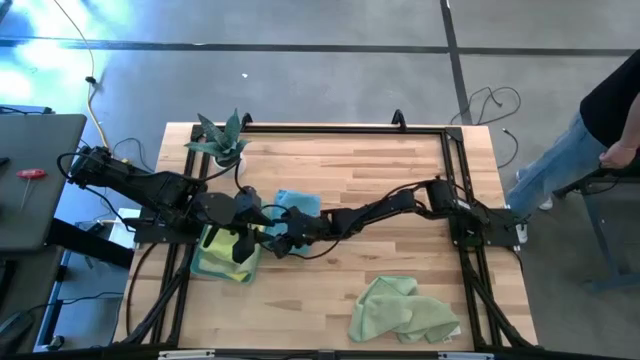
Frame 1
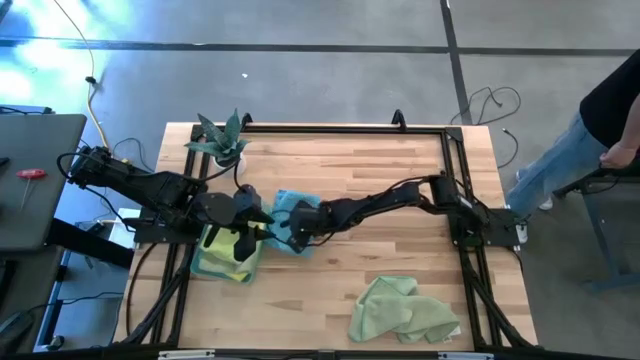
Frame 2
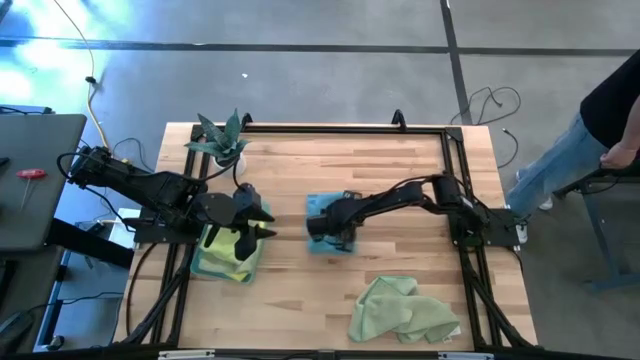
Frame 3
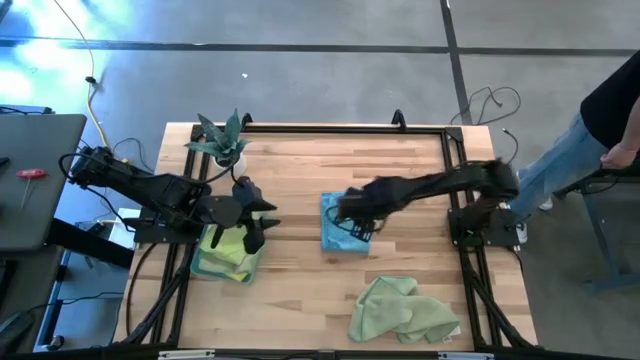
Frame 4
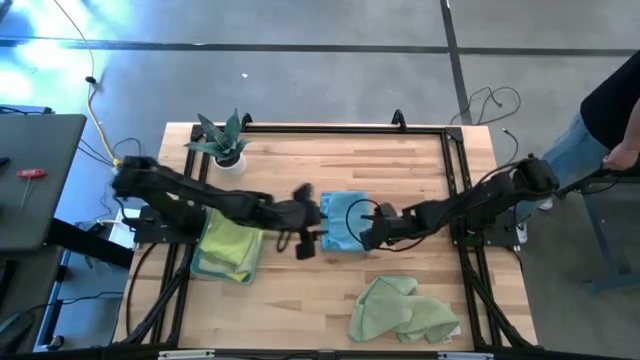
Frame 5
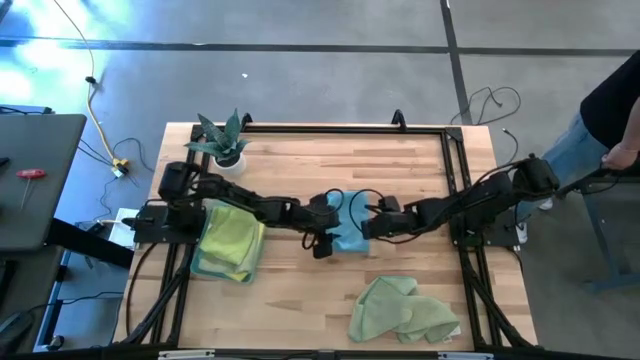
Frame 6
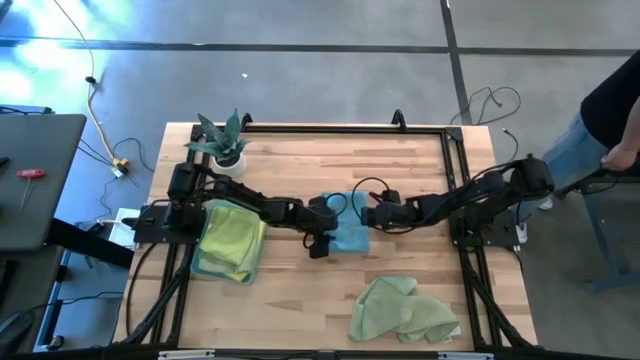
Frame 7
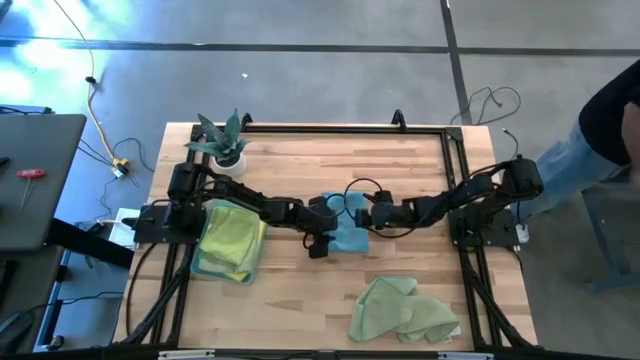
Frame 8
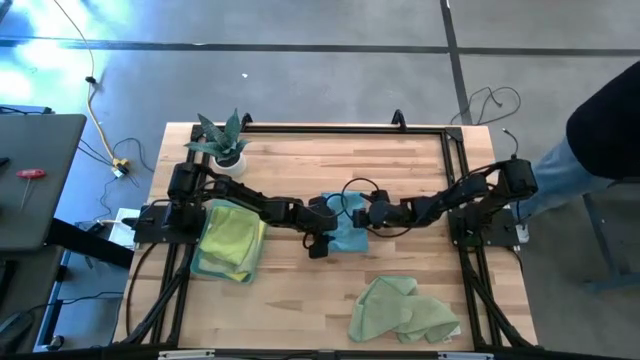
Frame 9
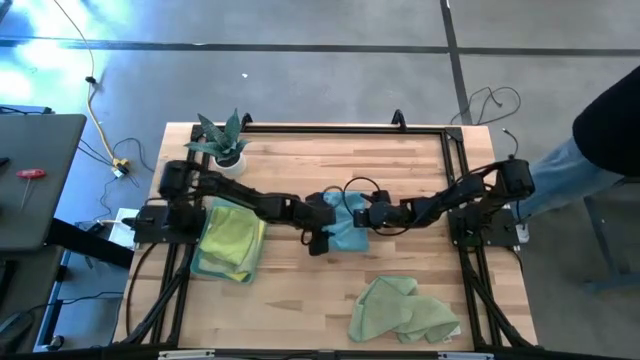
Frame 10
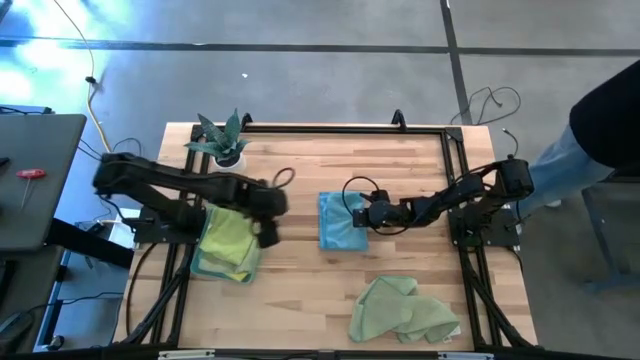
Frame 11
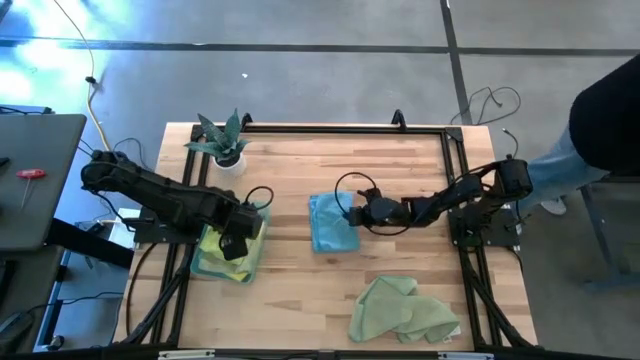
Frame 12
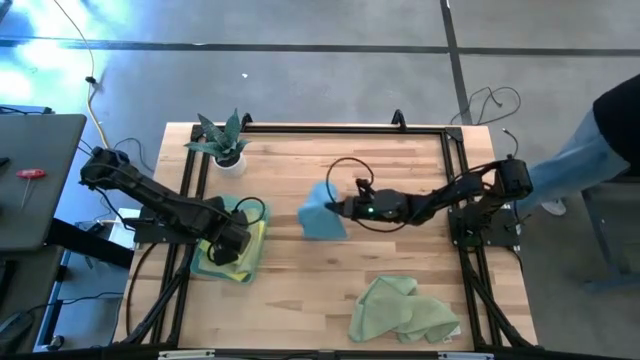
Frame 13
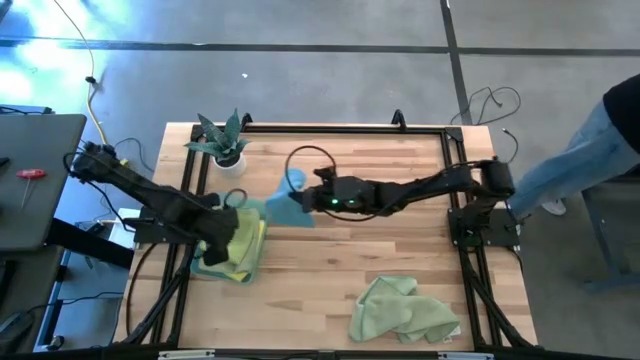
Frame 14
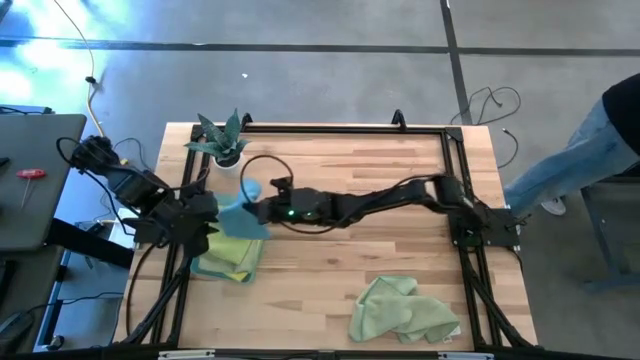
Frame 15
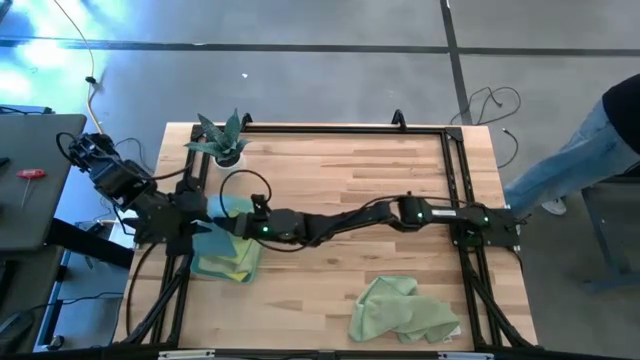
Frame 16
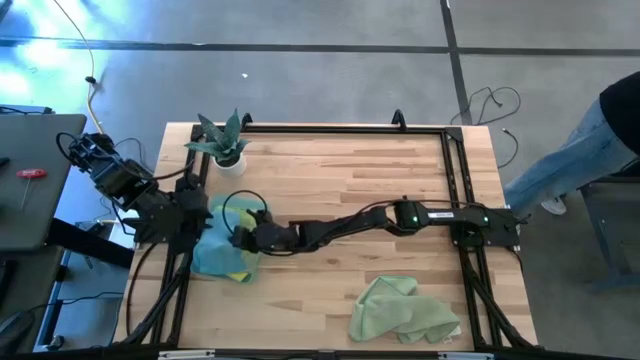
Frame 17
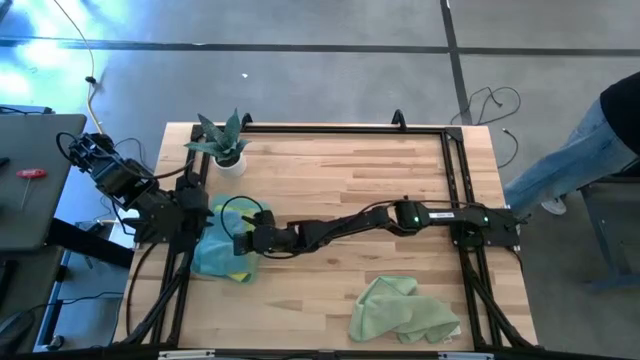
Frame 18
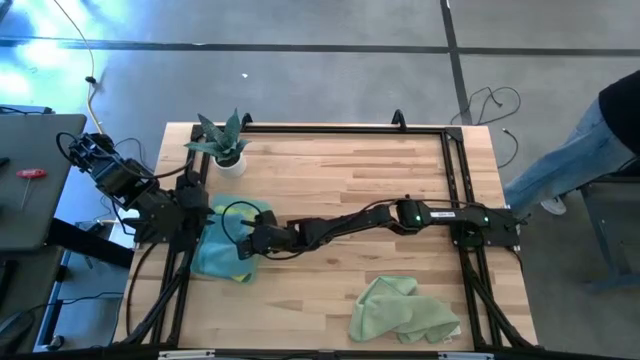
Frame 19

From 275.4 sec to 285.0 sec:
Task: Fold microfiber towels
Put the blue microfiber towel into the green bin

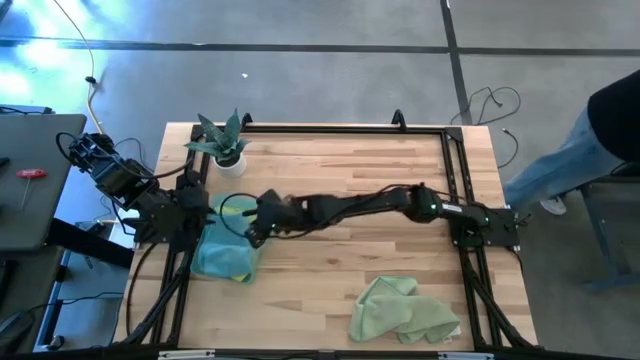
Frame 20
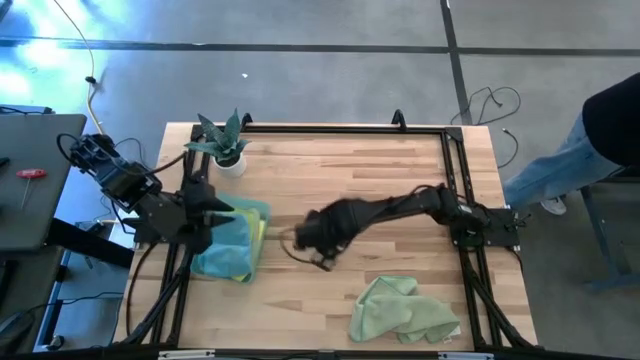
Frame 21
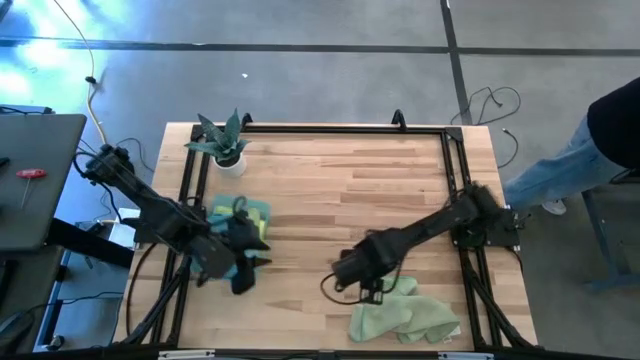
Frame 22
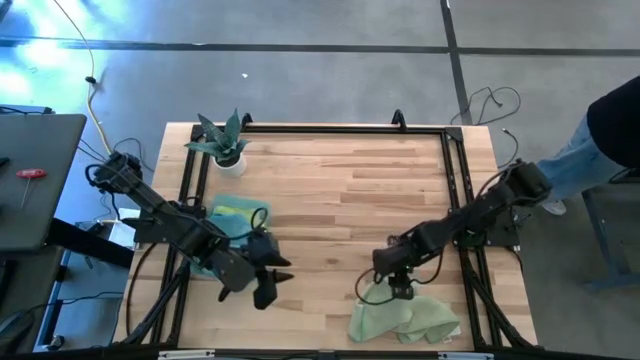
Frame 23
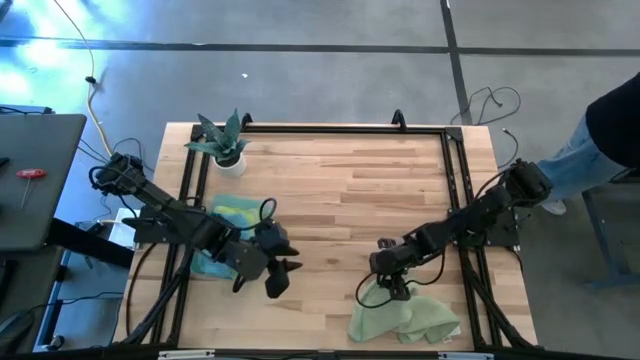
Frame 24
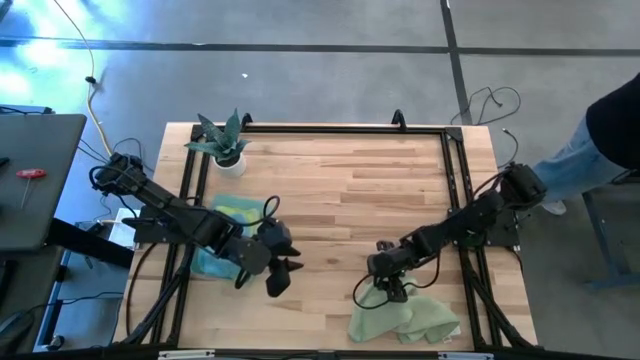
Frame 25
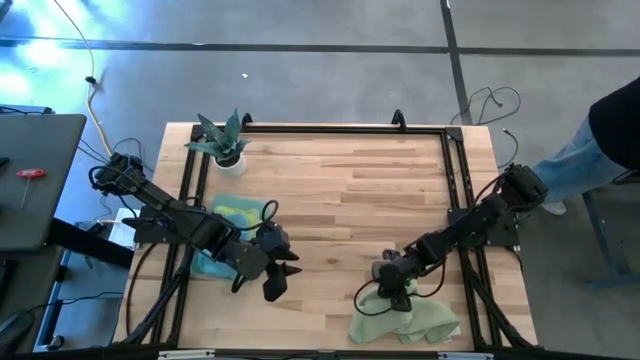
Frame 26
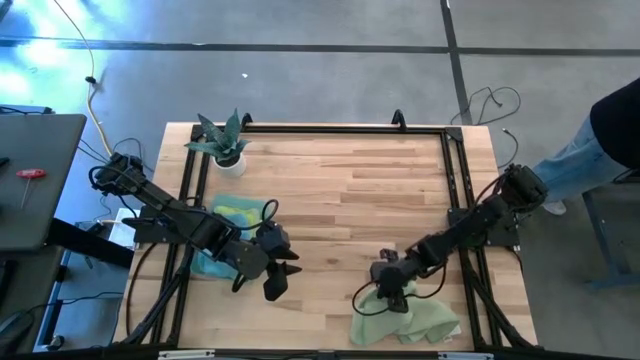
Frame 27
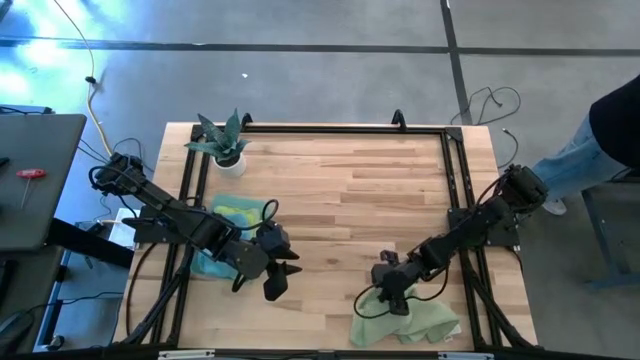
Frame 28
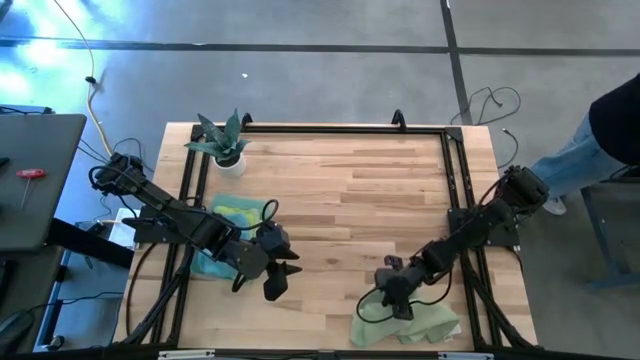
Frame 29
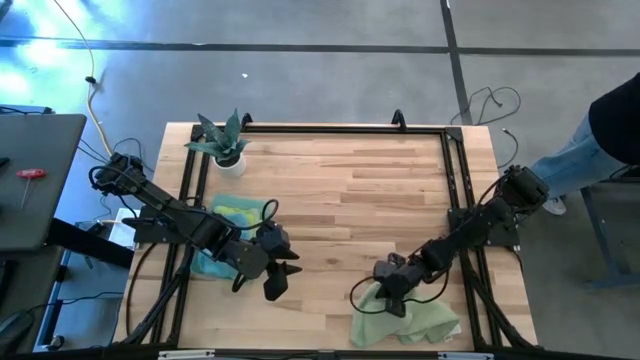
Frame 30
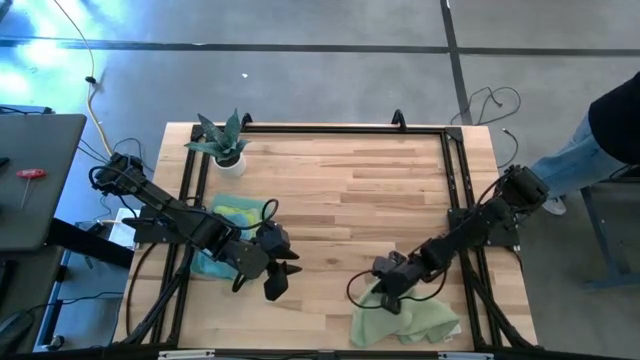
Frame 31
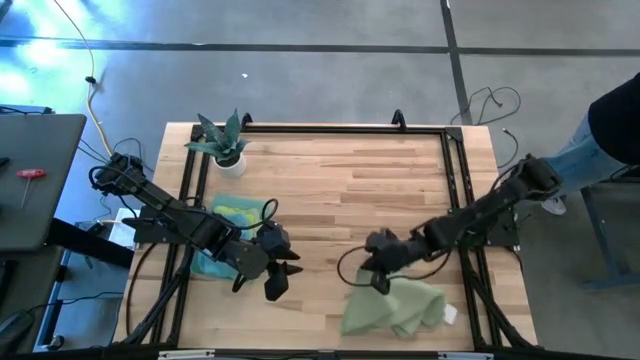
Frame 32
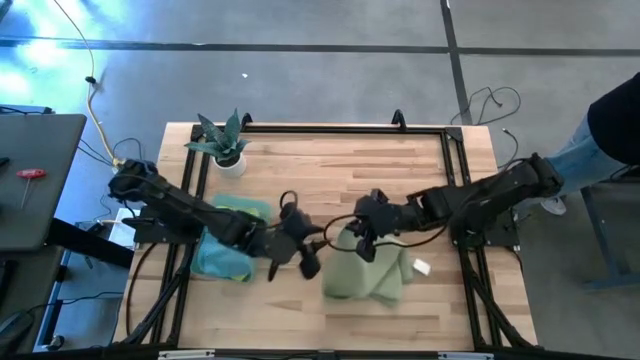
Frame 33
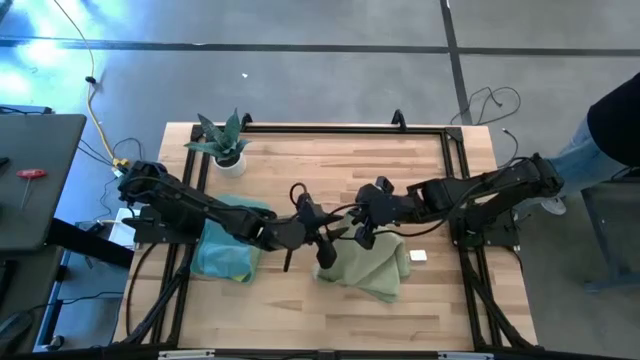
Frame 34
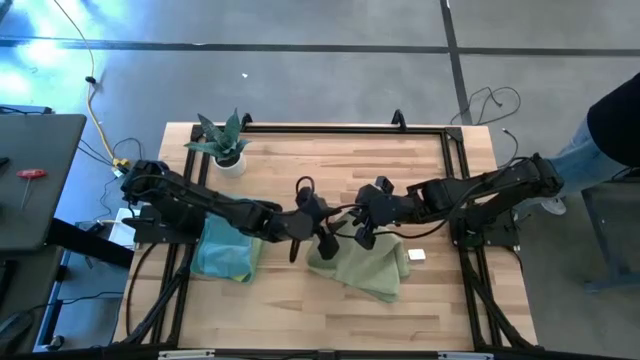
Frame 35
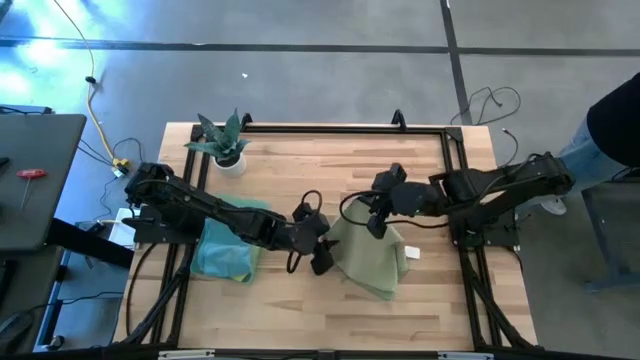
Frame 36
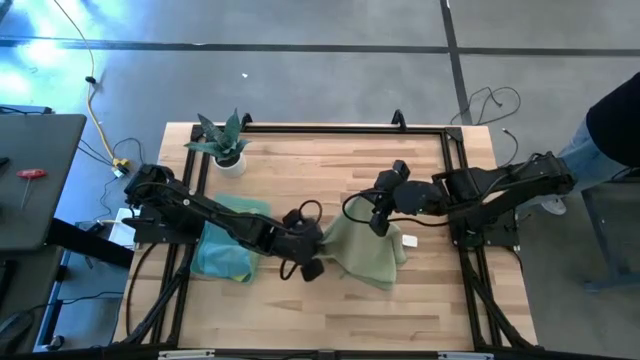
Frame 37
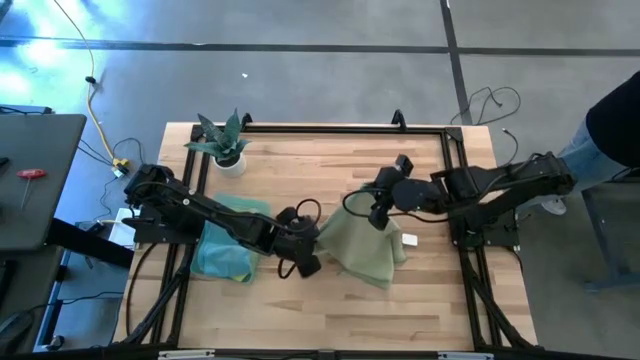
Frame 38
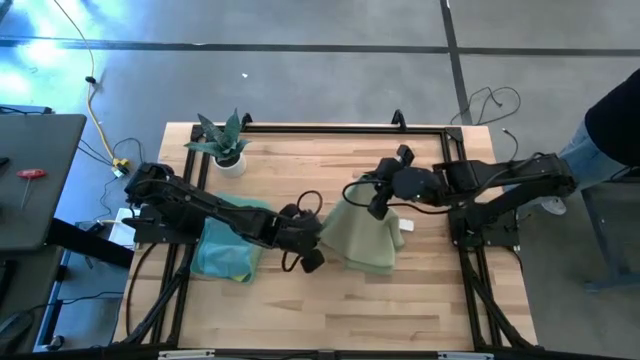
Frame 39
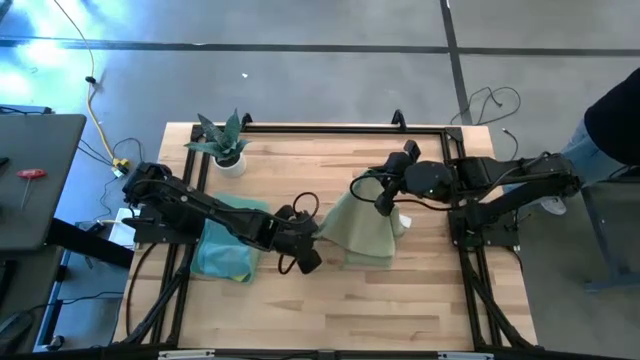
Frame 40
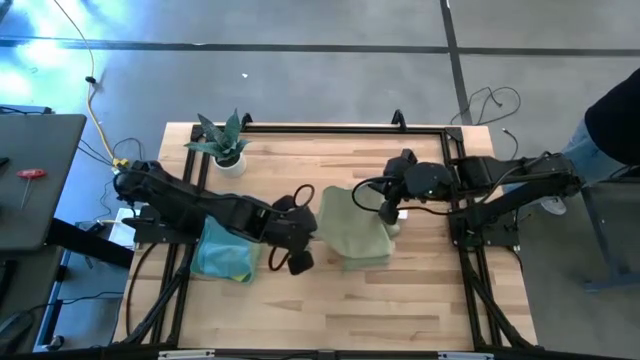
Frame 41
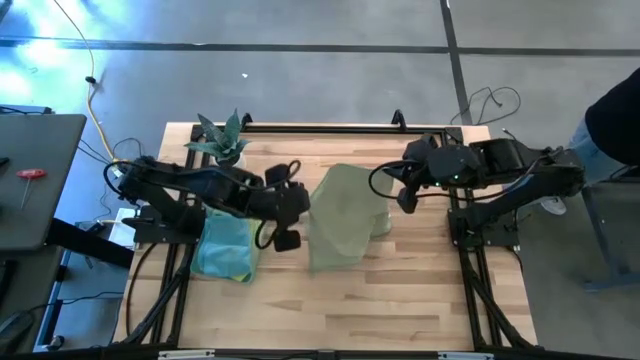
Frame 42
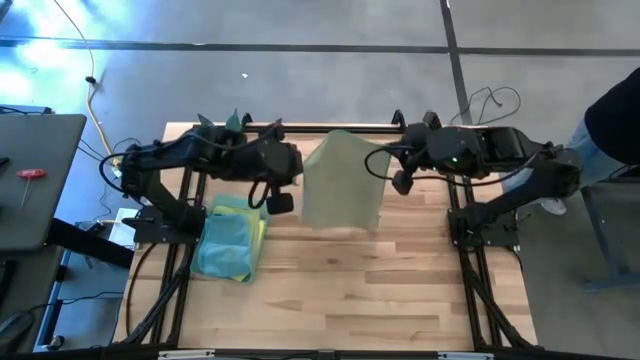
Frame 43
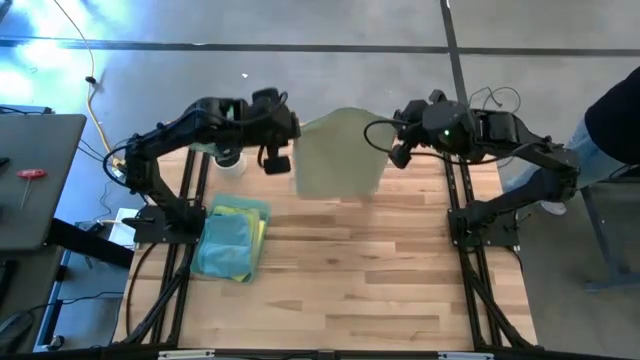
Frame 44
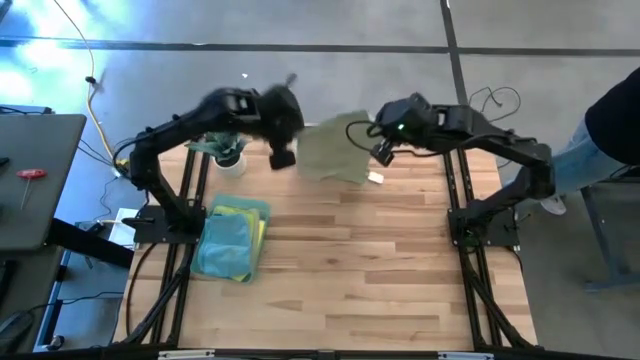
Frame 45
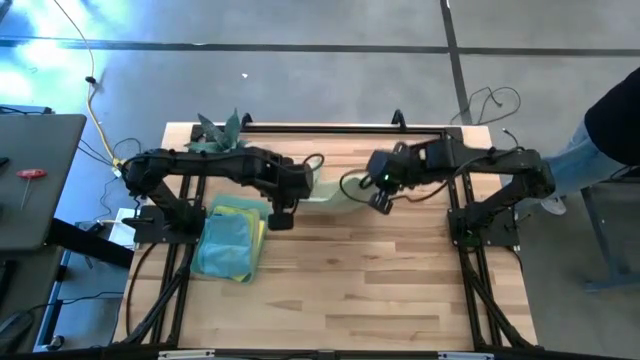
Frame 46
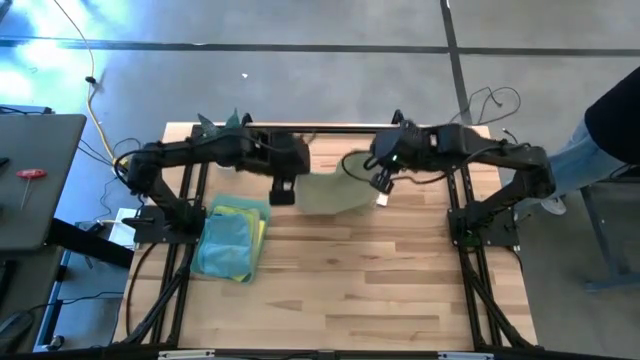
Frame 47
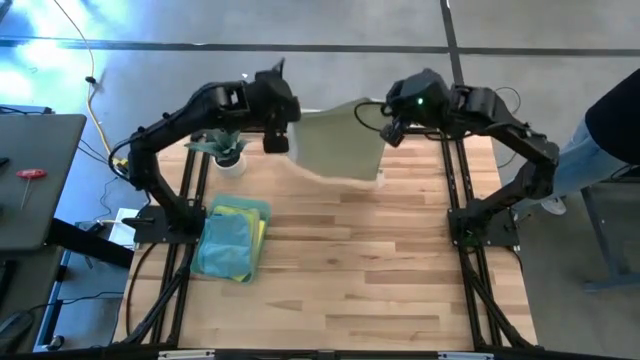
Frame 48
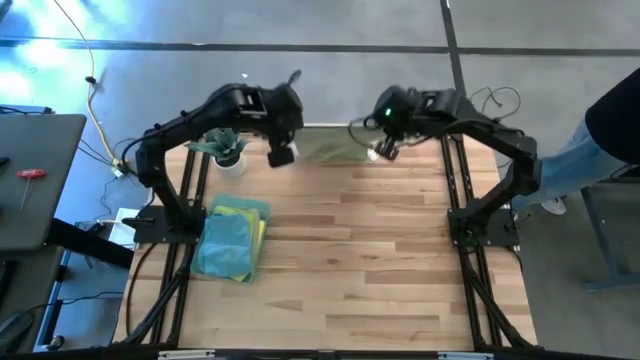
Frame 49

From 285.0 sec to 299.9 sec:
Fold the green microfiber towel
